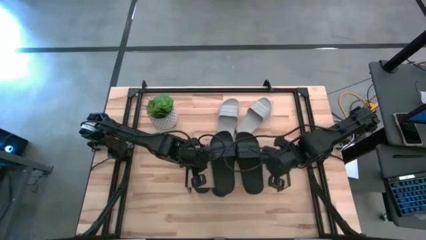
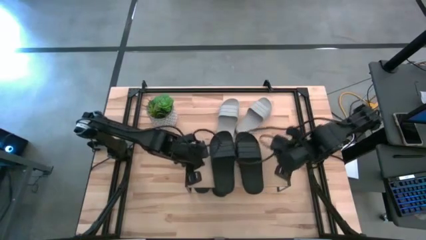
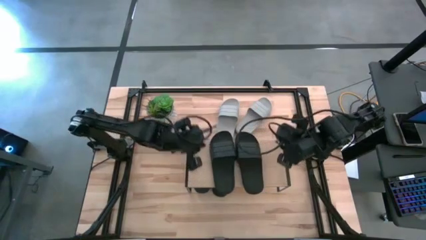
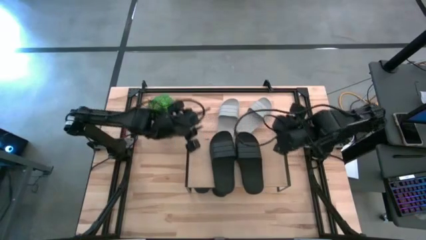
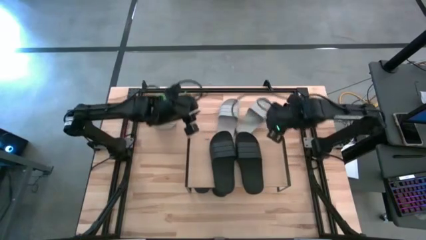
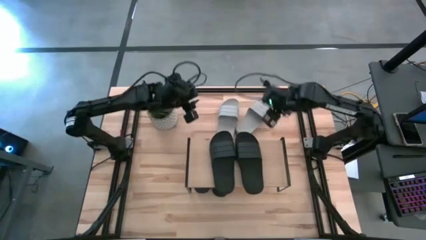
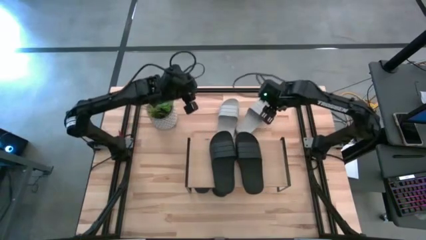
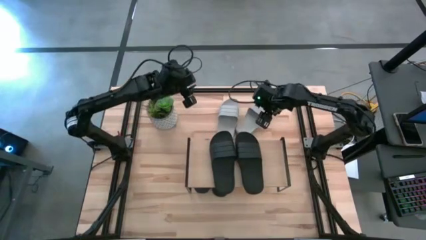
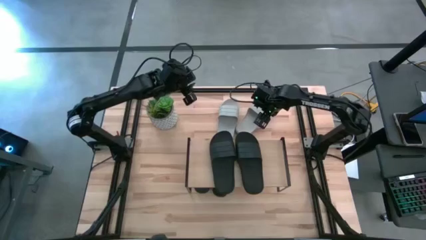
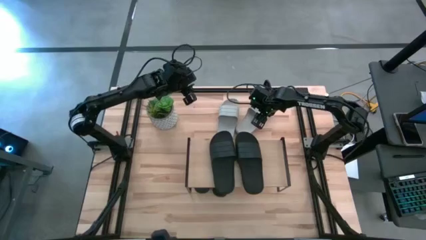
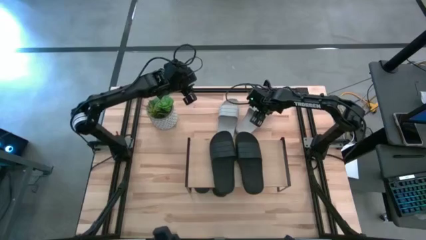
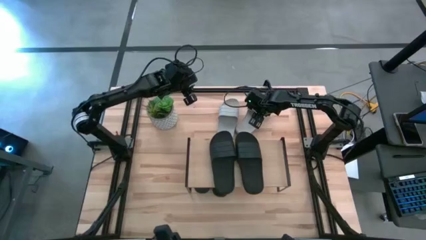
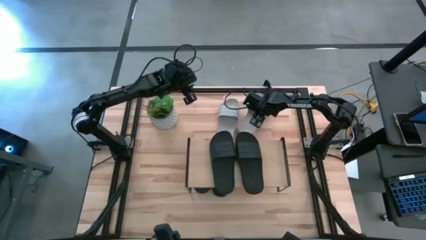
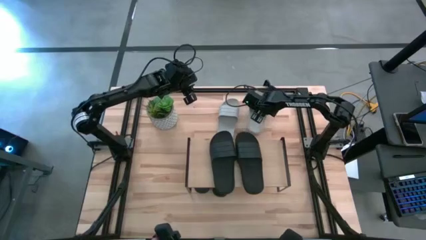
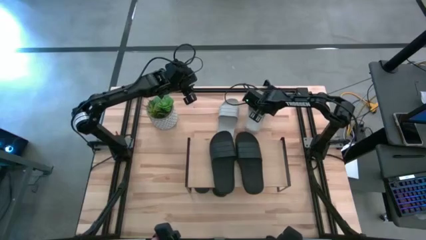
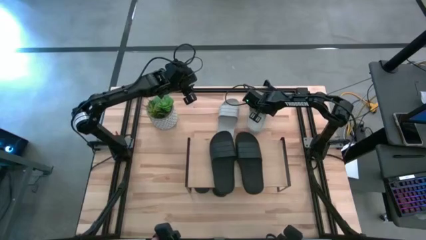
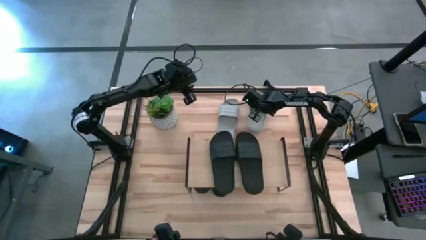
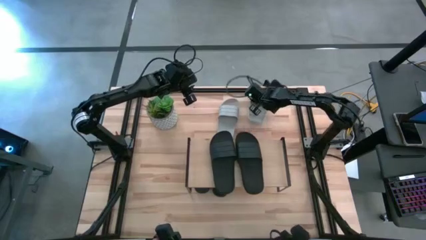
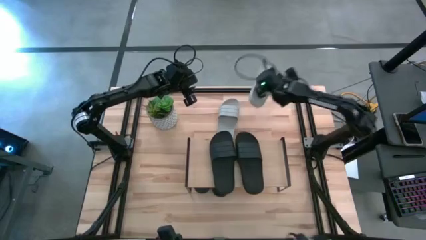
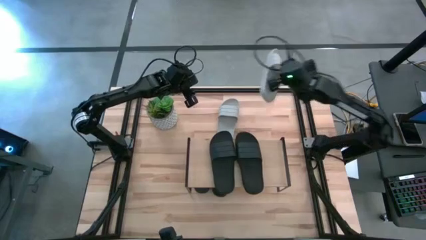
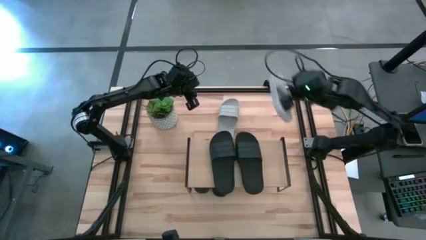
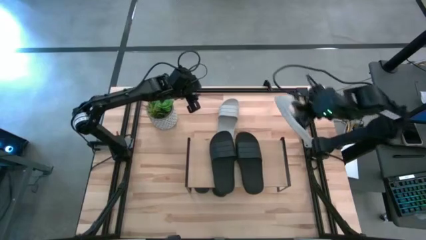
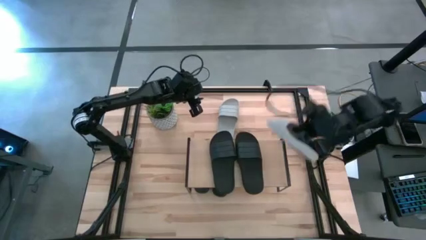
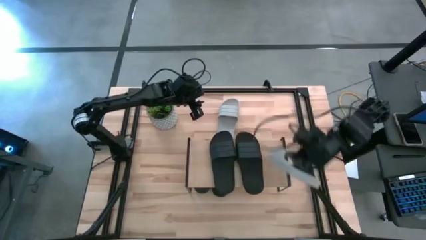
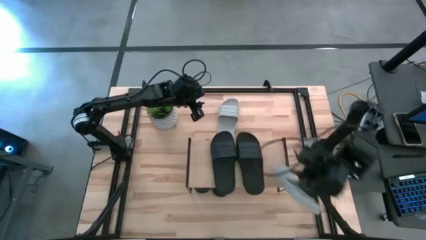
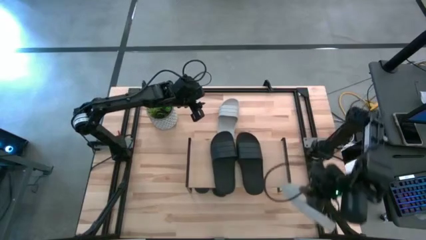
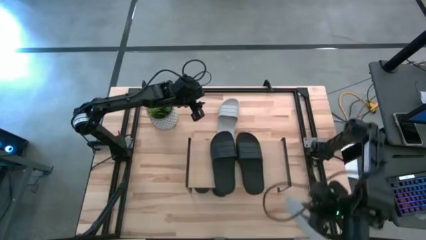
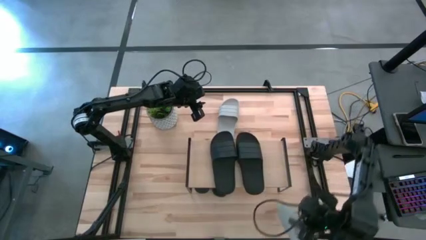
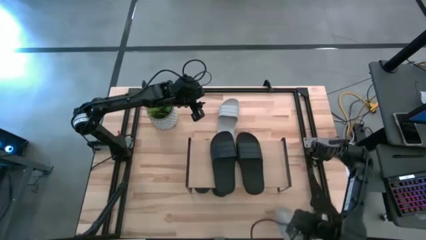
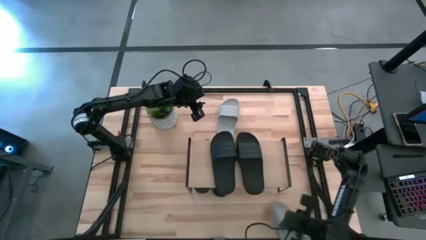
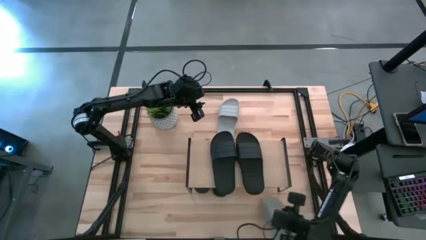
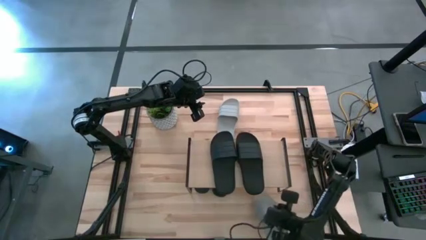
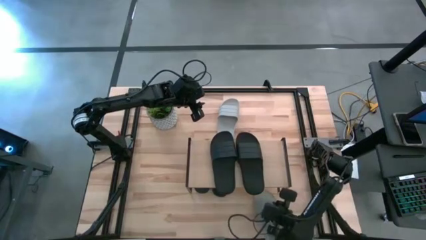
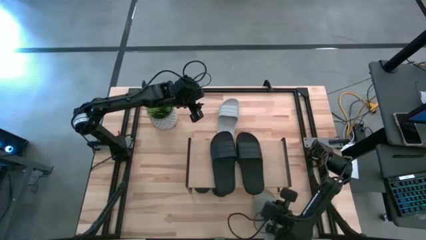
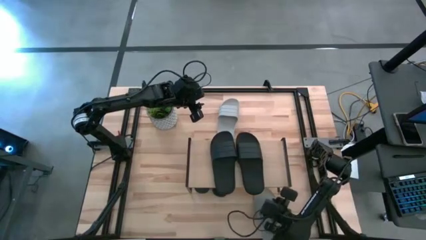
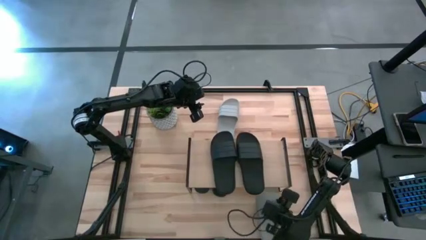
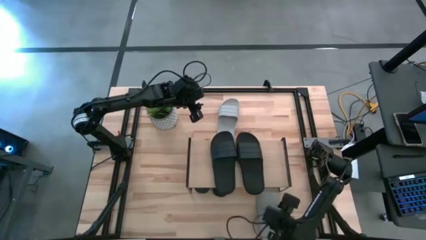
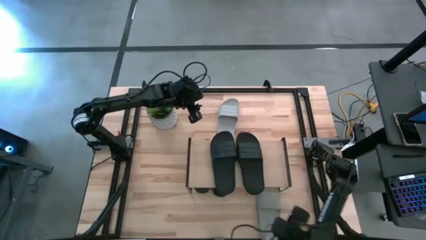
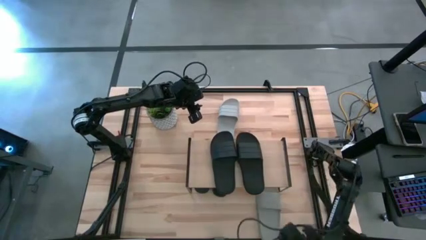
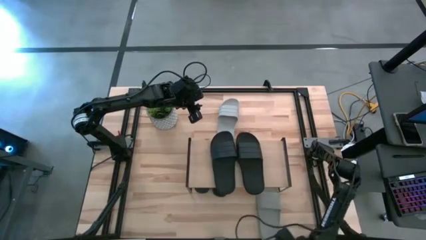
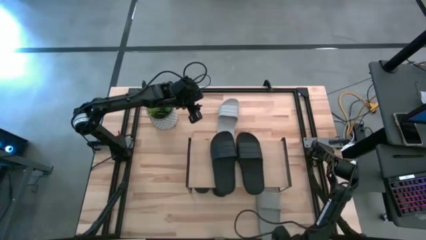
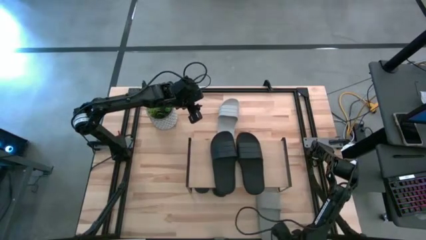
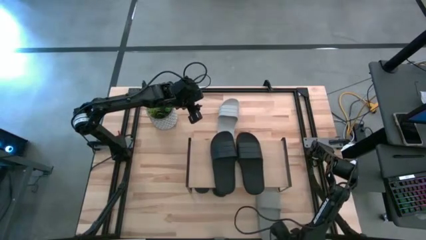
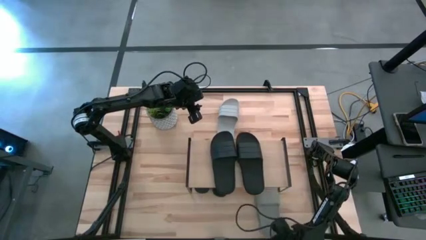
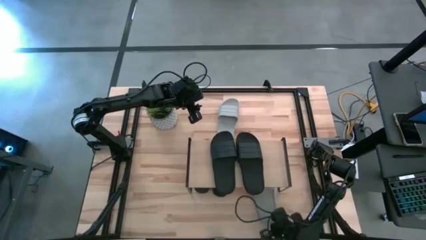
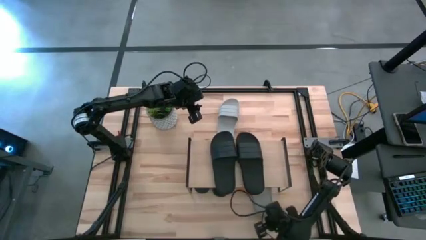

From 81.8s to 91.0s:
Task: Pick and place slides into the shelf
Put the gray slide under the shelf

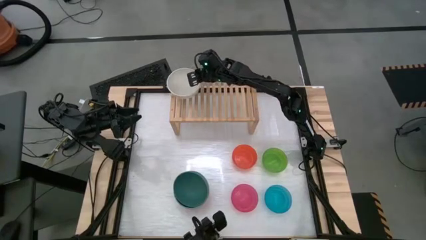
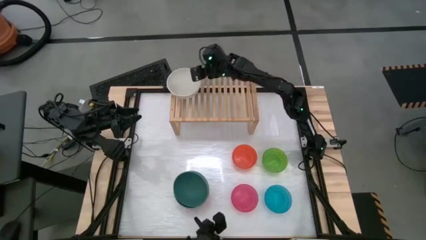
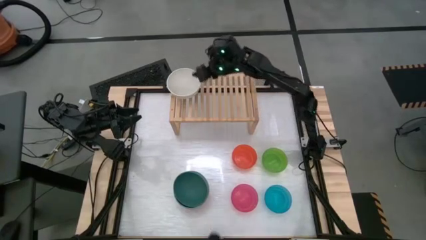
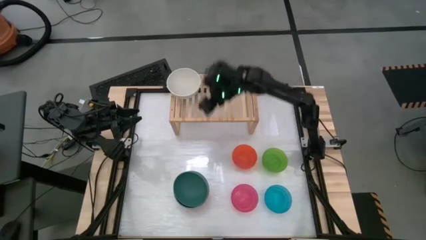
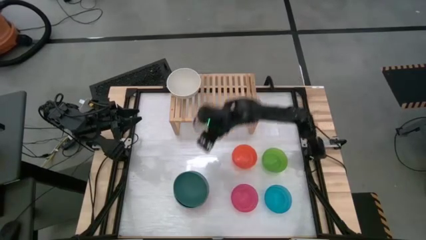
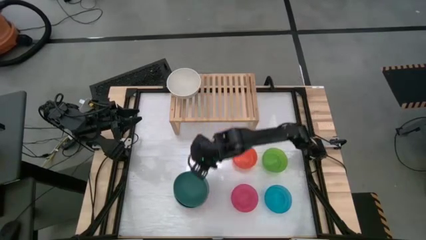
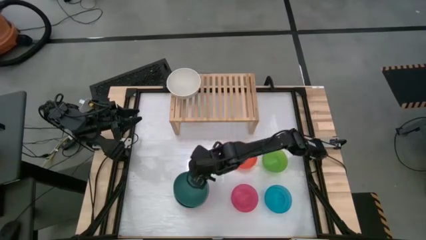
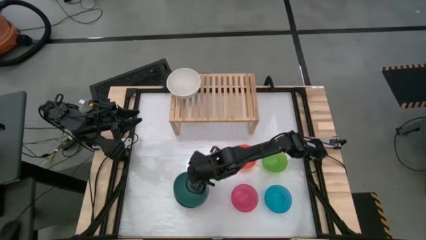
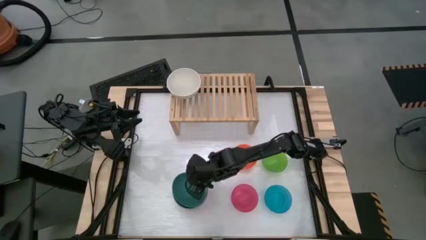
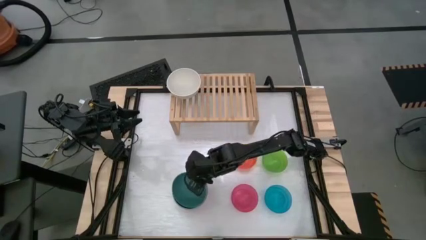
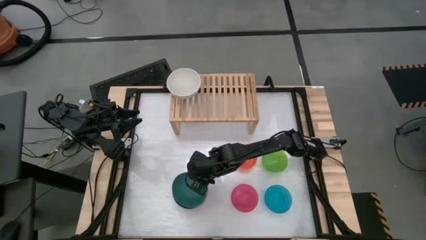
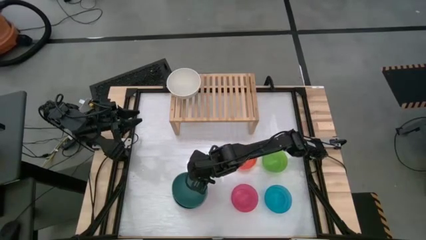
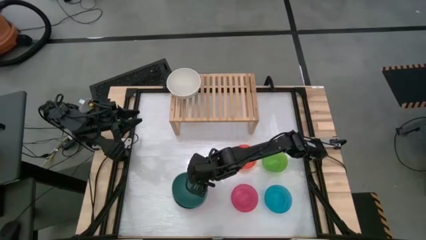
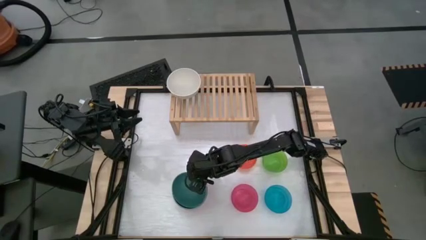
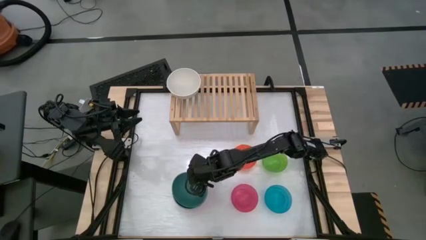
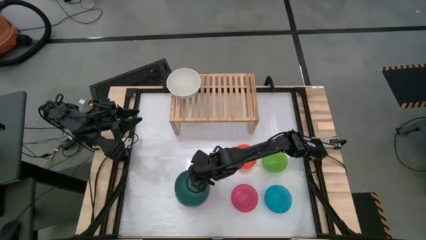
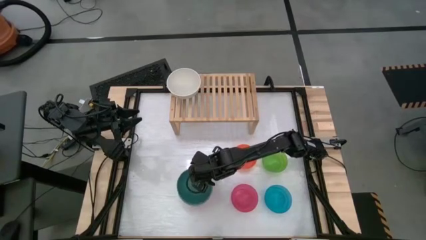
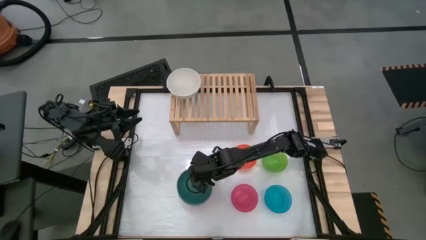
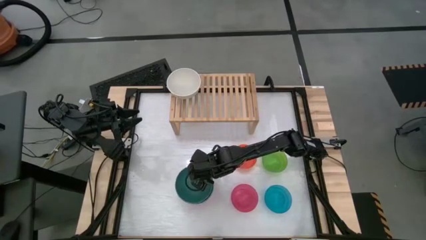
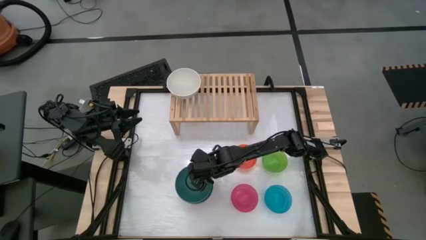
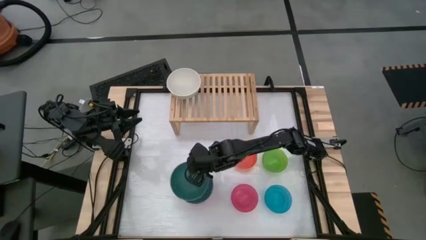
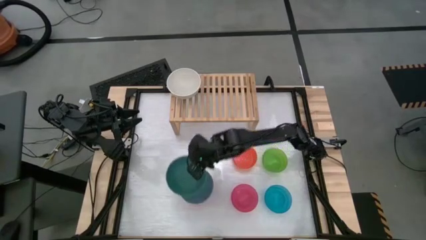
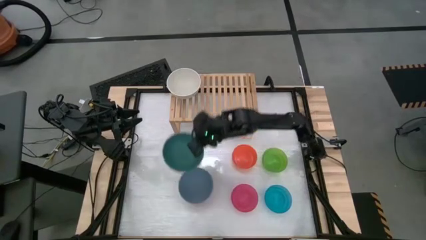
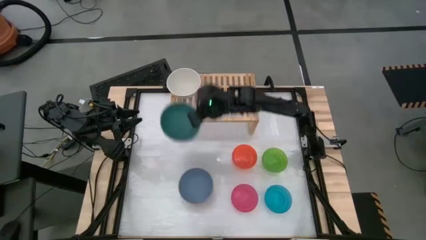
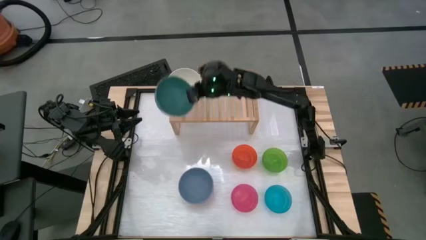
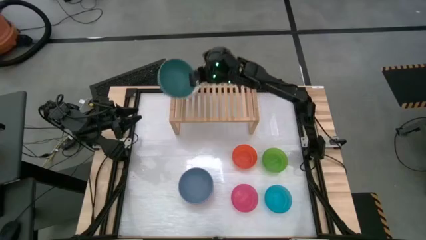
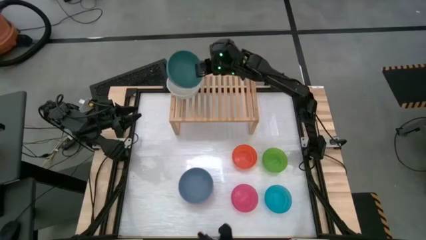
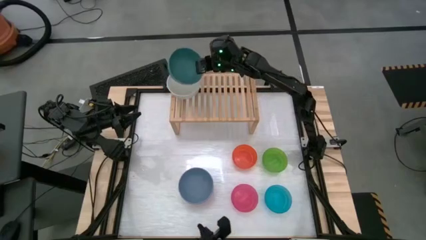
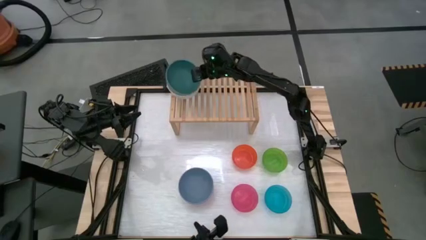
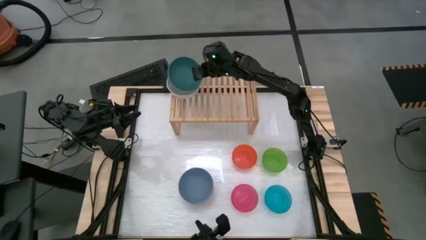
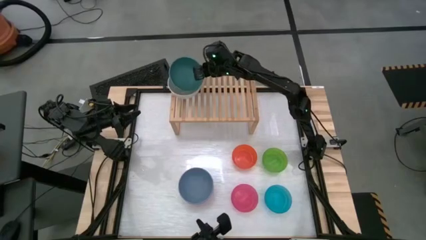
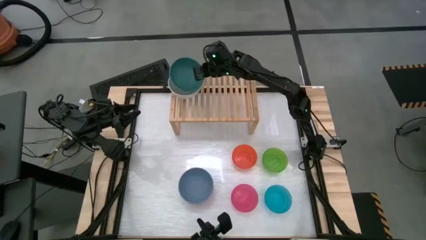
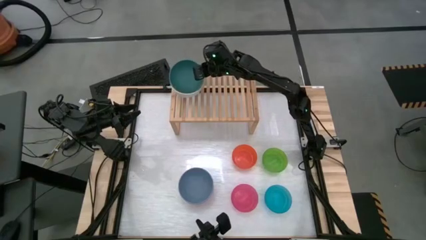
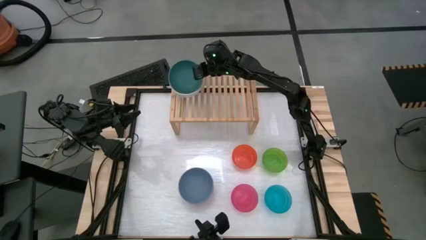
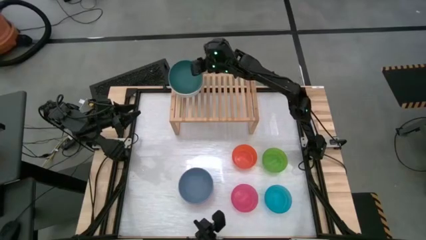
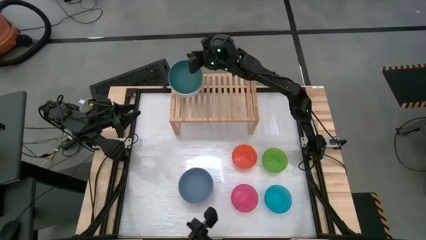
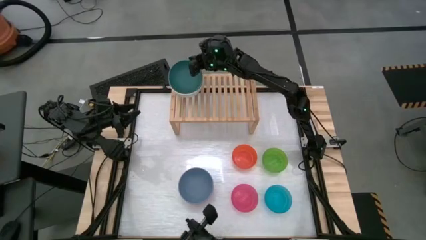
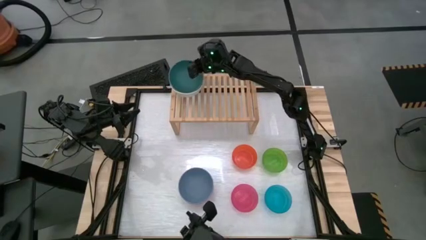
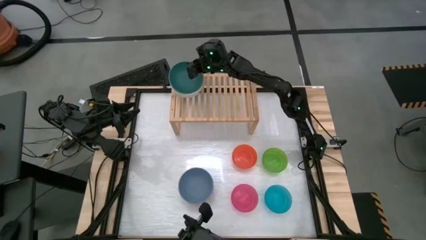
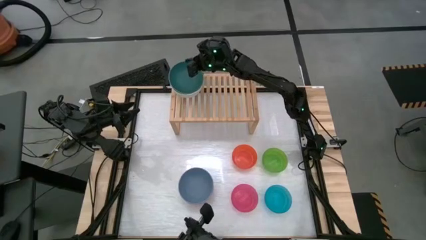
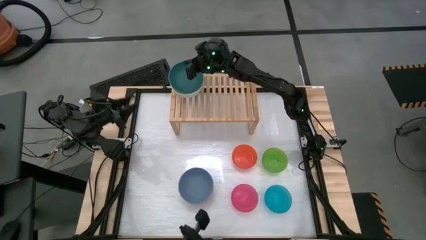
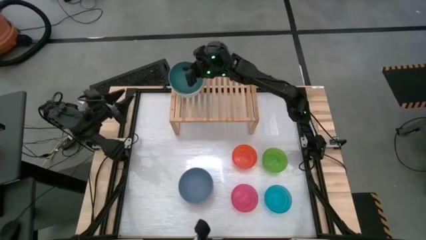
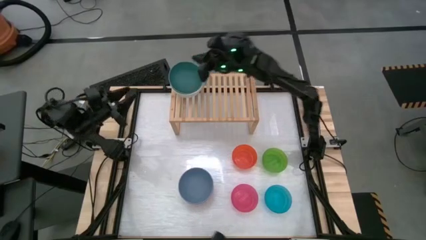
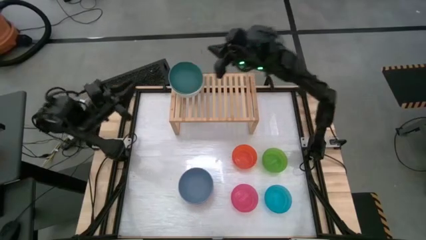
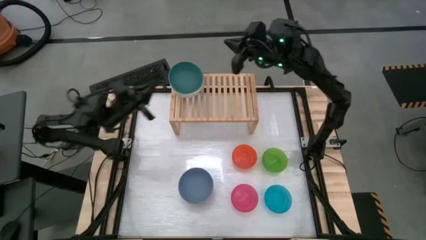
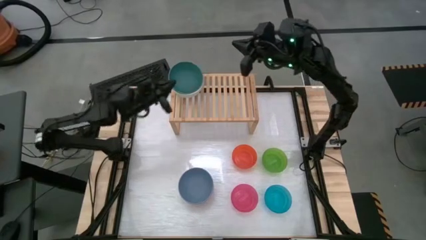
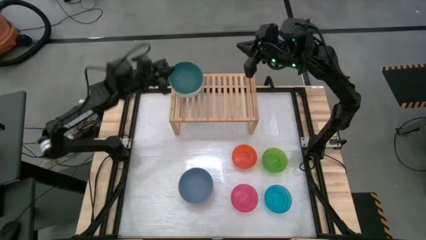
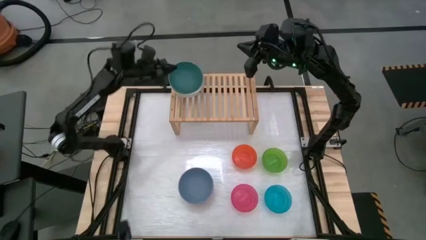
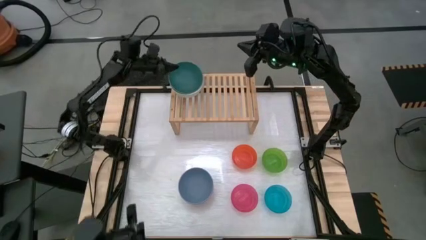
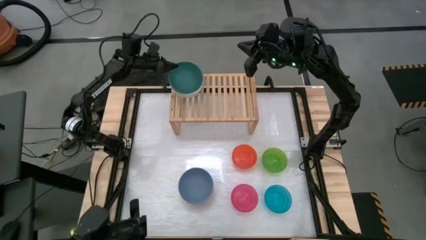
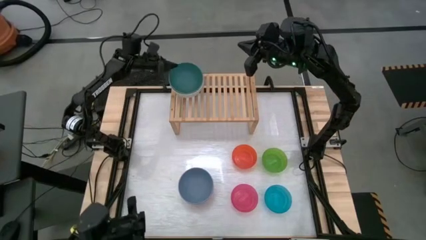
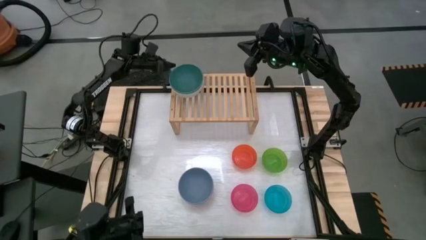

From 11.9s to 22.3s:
Task: Place and stack bowls onto a shelf
Stack the large green bowl on top of the large white bowl
